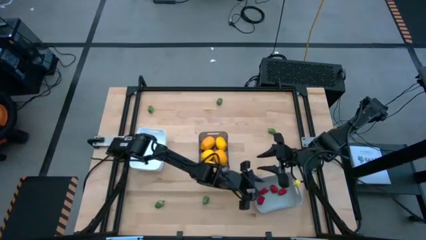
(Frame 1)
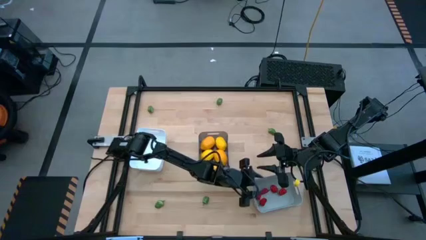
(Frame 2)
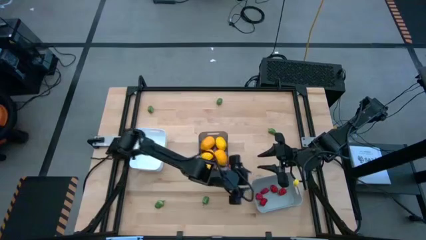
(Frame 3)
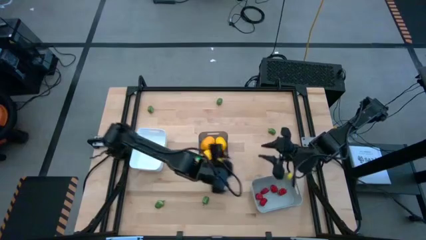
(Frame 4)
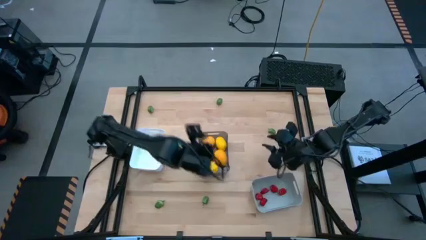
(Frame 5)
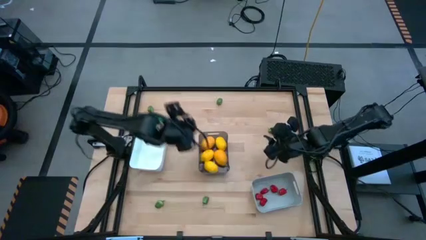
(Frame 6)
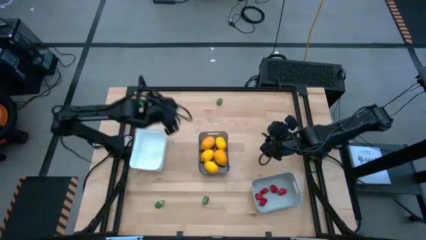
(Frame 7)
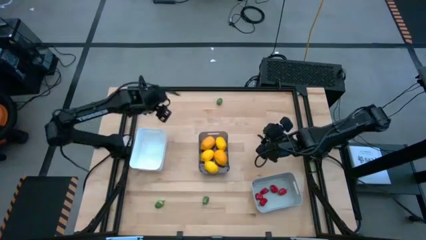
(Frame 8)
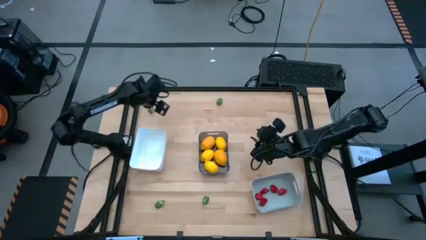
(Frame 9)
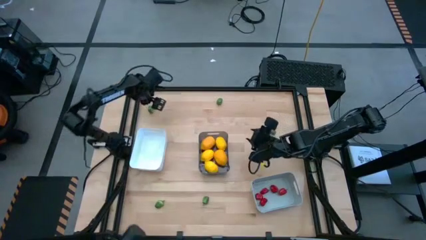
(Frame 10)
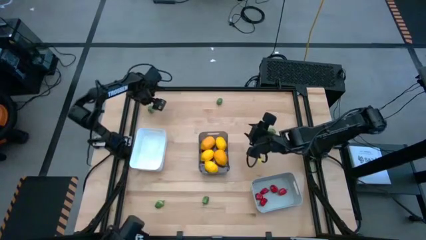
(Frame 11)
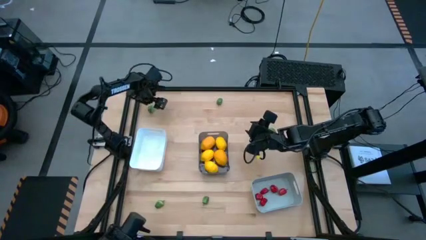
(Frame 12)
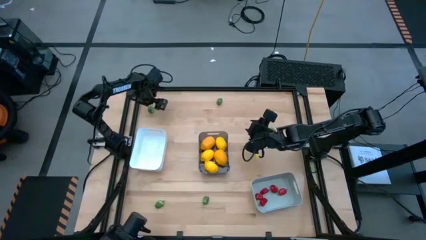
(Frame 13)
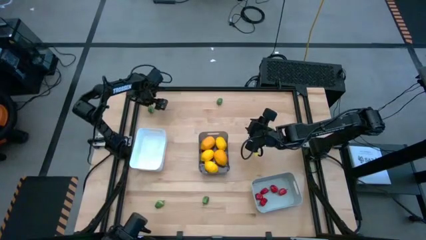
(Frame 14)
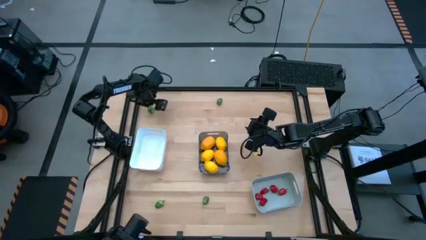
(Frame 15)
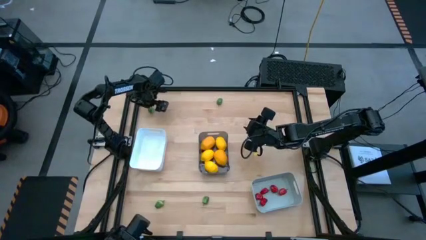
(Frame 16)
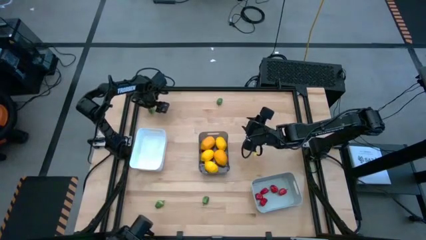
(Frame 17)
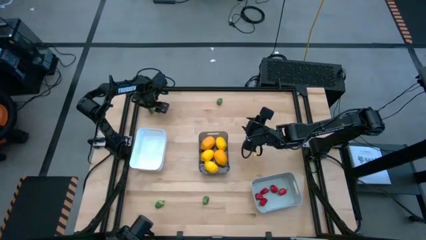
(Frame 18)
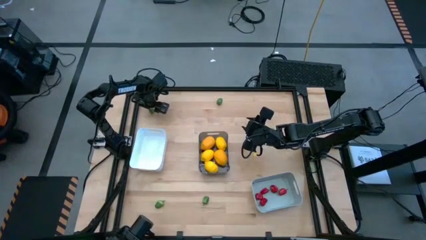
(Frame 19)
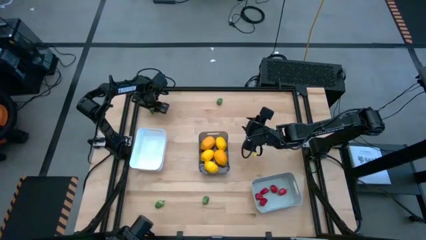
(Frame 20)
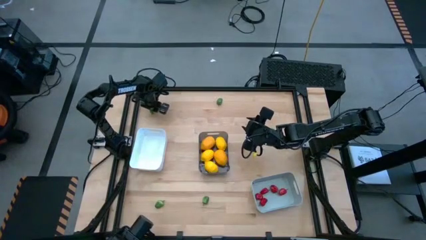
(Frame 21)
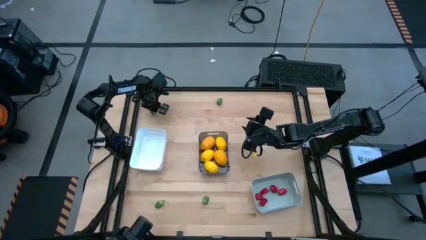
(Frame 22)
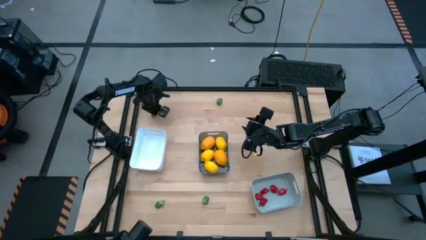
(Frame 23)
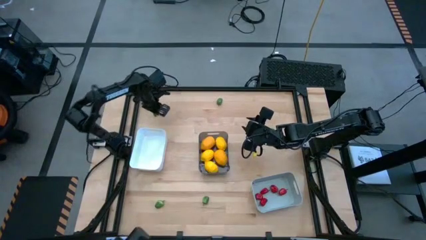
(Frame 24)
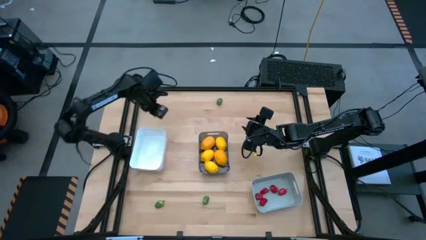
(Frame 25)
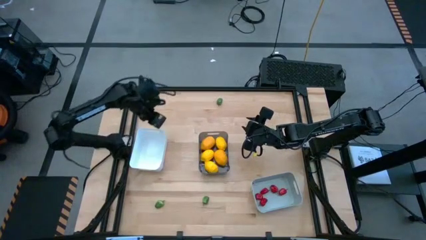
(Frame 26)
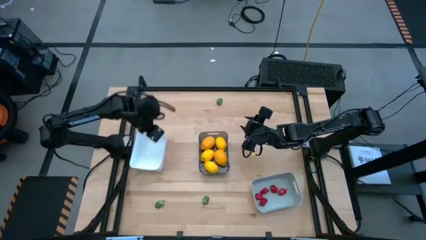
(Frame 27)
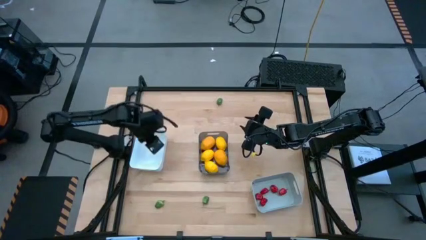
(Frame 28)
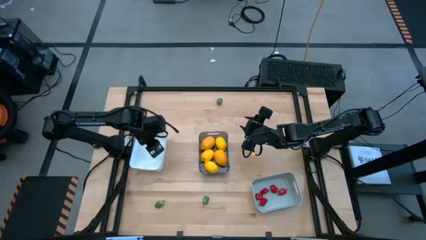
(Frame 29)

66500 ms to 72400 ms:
Task: Sort produce into baskets
Put the green chili pepper into the white bin

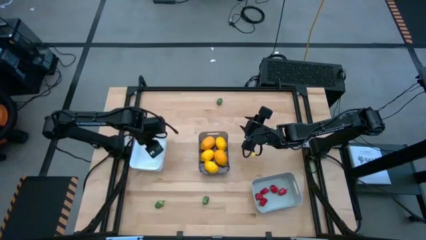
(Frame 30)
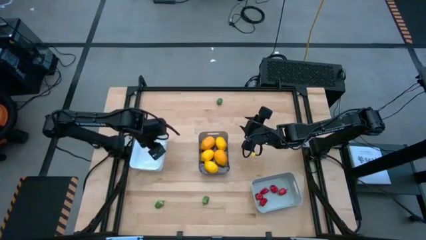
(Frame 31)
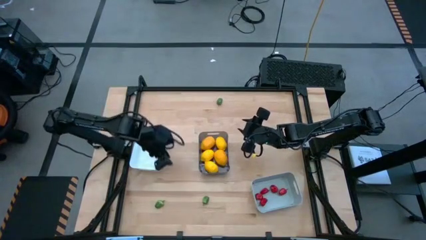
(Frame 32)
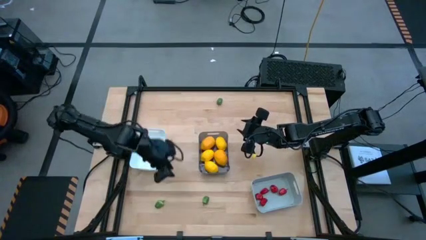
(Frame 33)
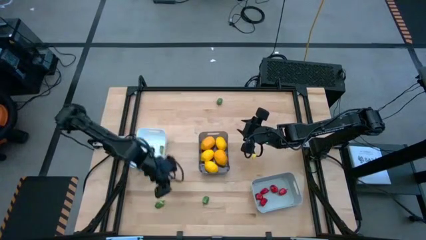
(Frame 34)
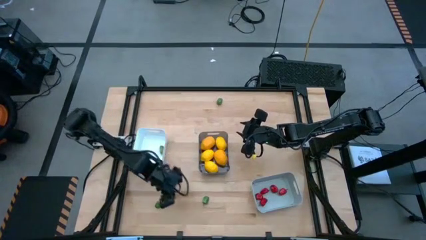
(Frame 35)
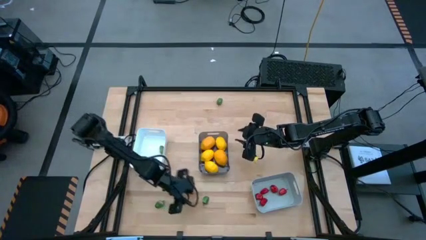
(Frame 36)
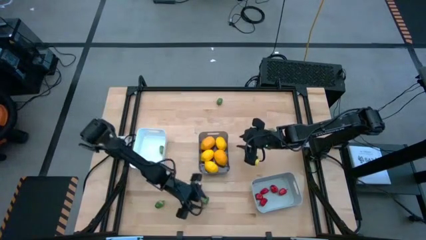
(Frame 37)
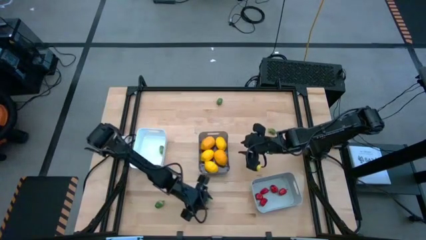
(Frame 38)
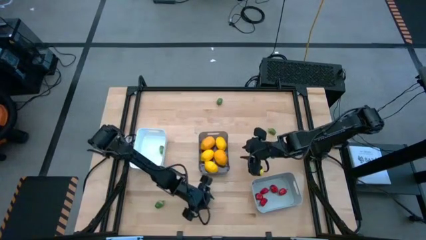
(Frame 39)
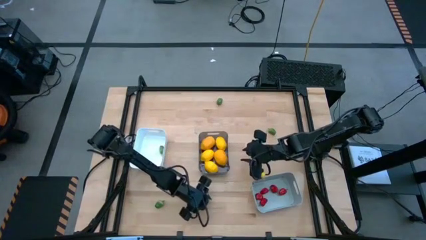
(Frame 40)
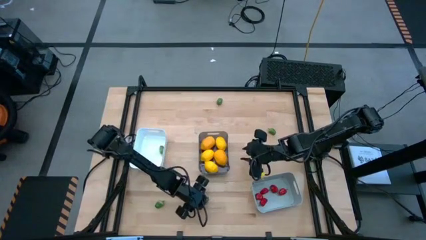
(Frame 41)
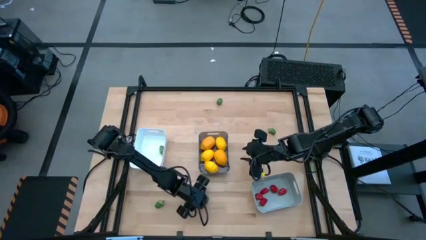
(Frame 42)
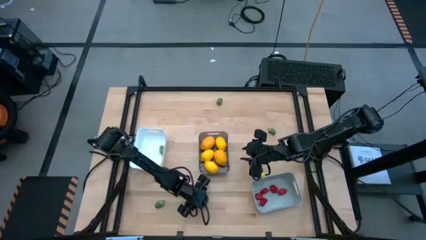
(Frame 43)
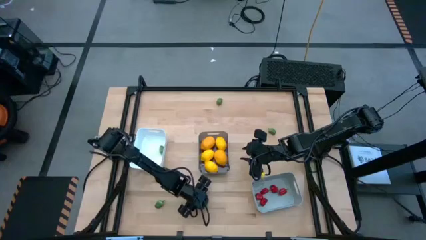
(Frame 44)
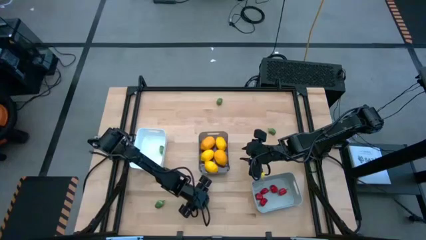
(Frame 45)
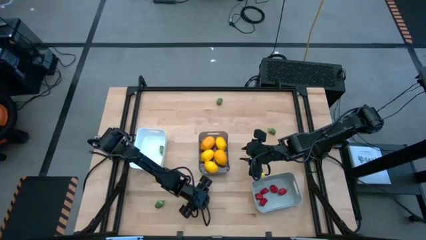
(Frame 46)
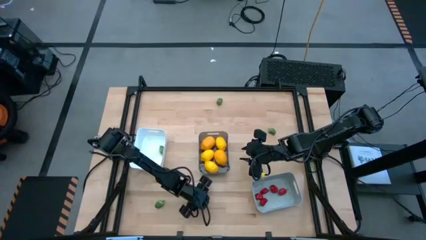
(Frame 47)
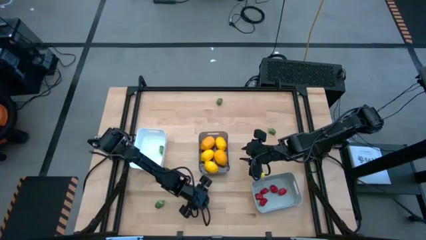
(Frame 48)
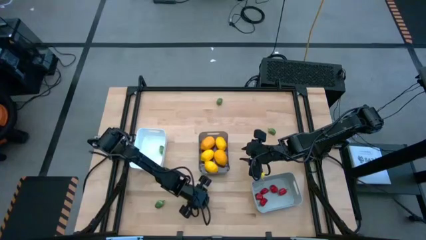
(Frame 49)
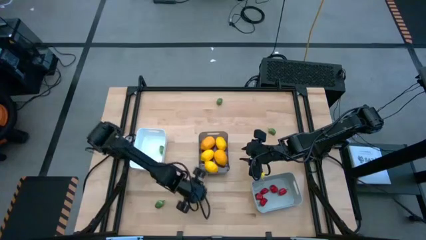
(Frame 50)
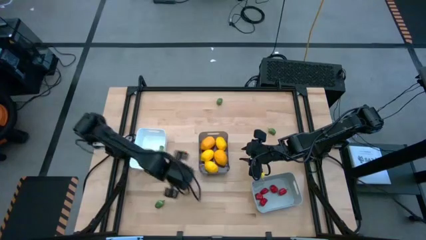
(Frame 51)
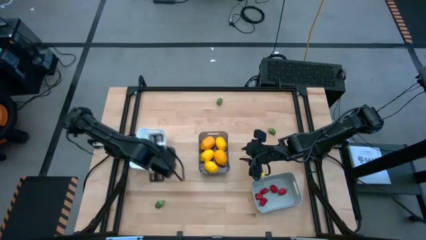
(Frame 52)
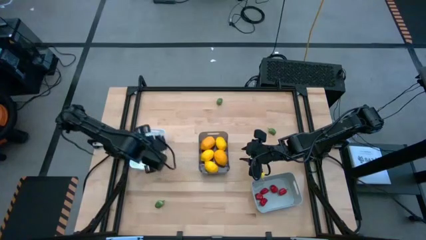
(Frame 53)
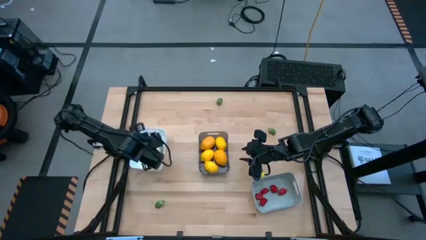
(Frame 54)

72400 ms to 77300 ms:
Put the green chili pepper into the white bin

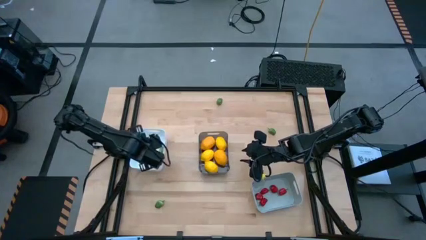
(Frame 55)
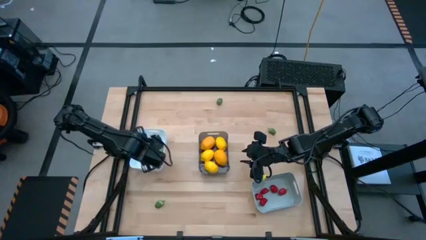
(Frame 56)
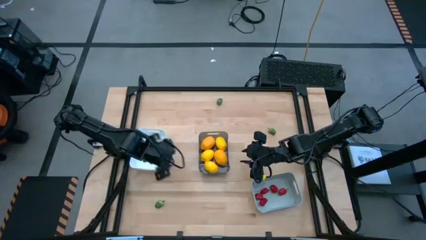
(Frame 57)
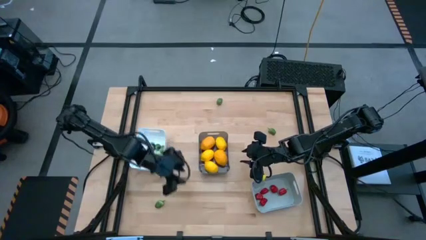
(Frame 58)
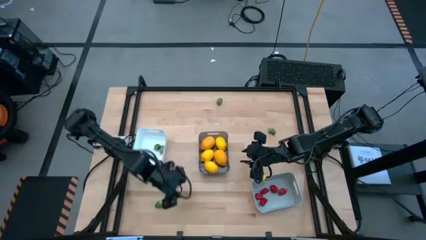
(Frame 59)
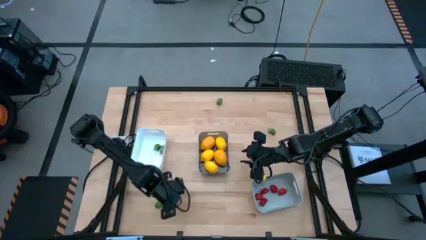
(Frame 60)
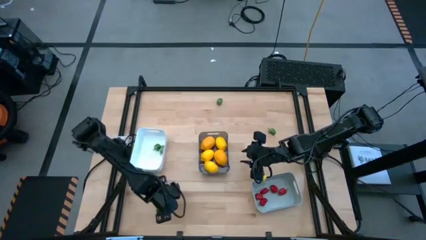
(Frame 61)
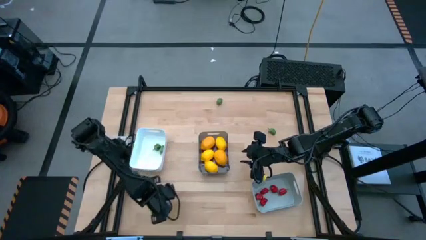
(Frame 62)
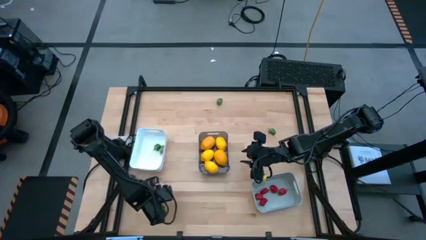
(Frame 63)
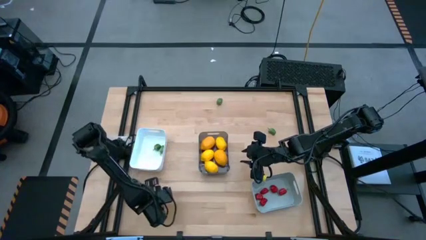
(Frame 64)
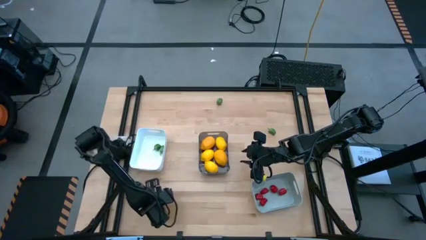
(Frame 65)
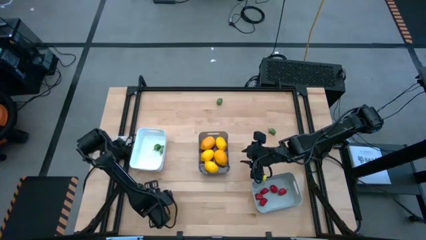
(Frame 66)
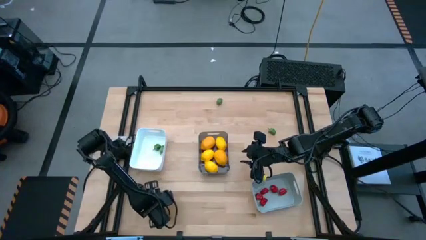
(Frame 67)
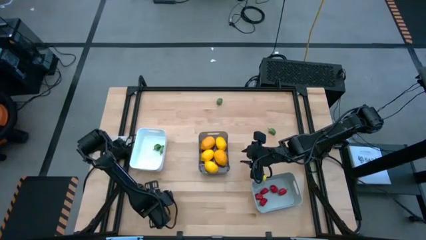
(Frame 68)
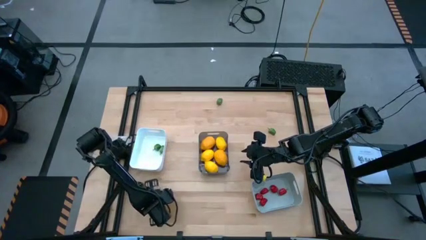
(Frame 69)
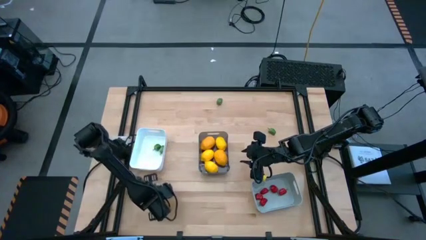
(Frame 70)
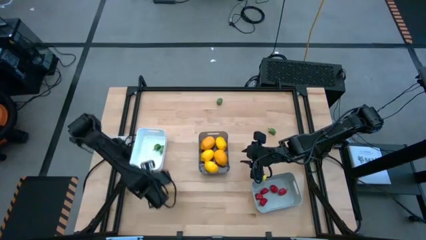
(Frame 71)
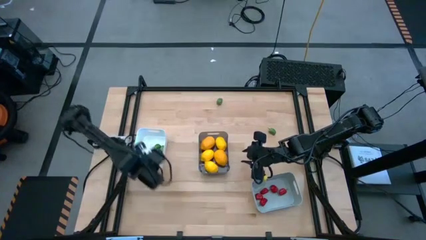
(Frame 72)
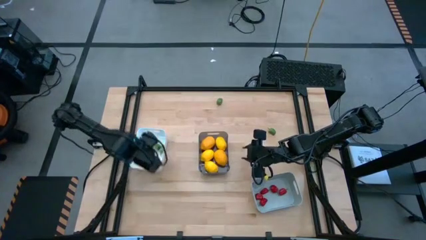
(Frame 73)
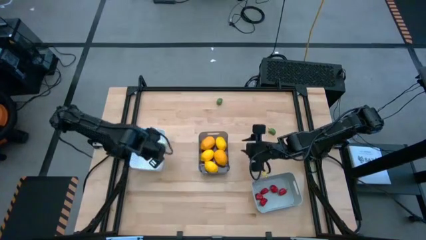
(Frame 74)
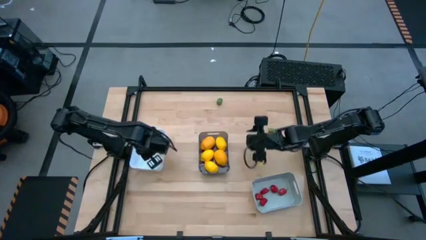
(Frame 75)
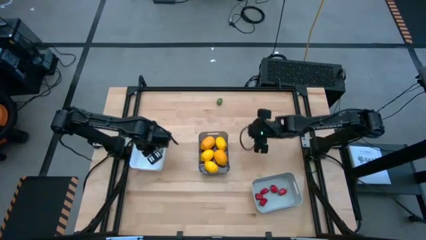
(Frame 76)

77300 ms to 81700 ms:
Put the green chili pepper into the white bin
